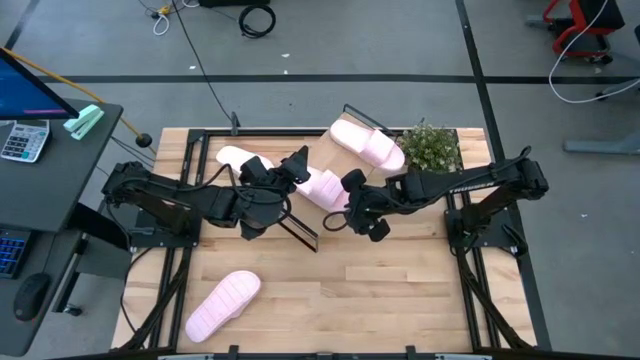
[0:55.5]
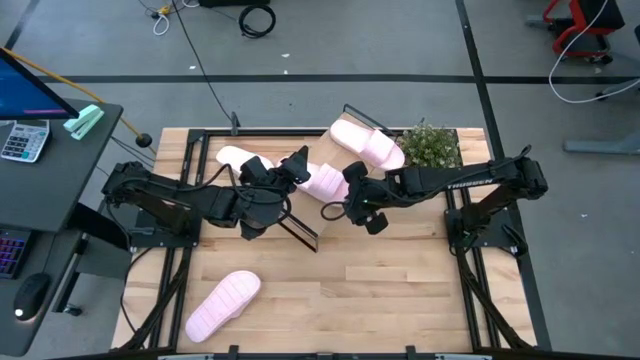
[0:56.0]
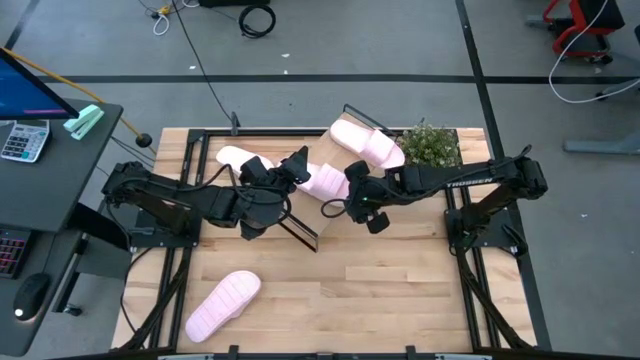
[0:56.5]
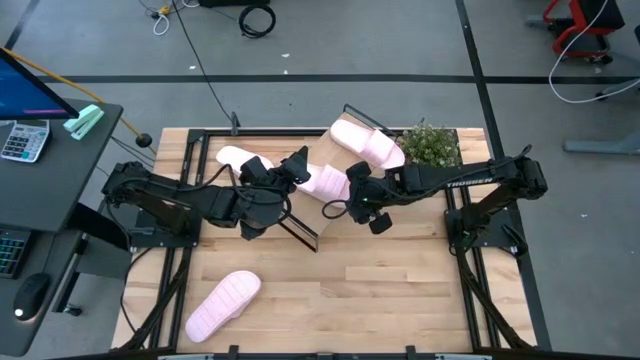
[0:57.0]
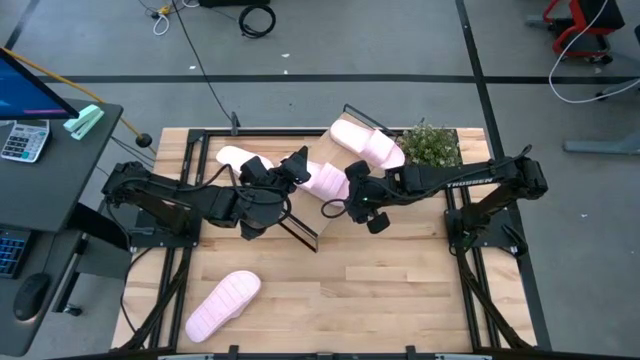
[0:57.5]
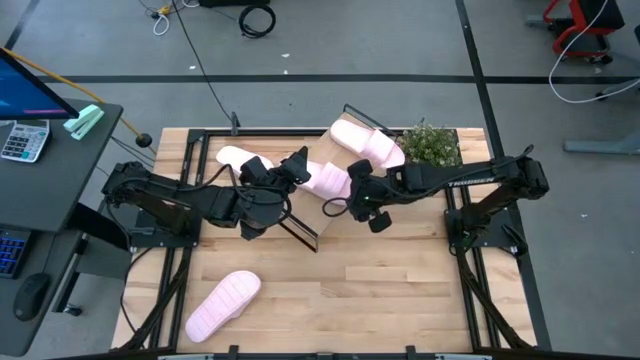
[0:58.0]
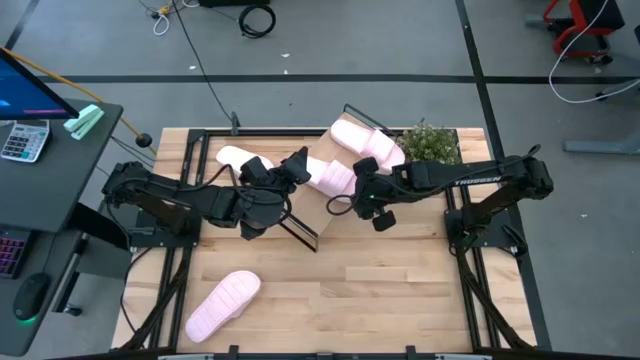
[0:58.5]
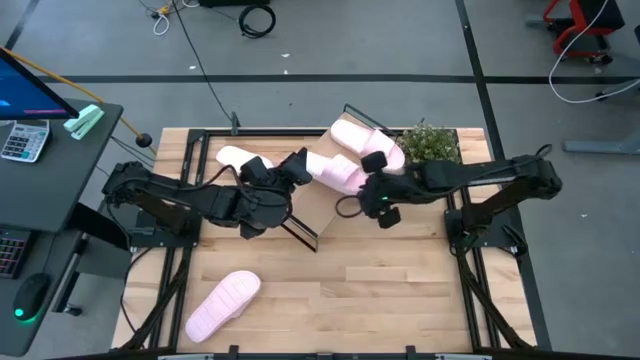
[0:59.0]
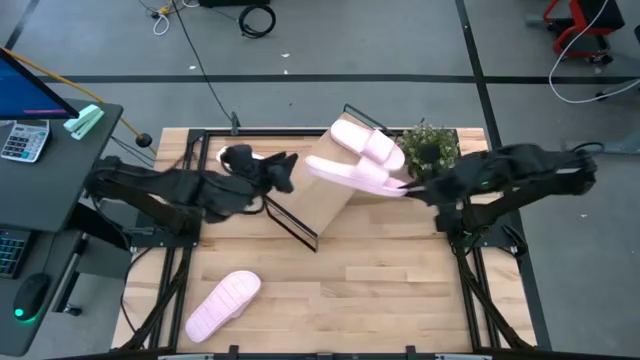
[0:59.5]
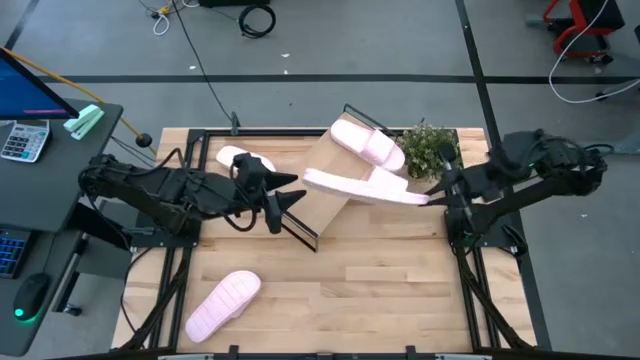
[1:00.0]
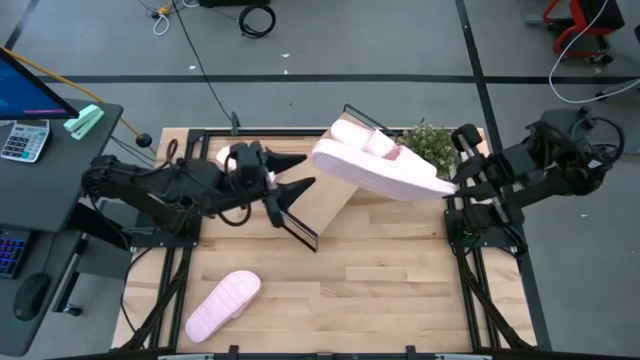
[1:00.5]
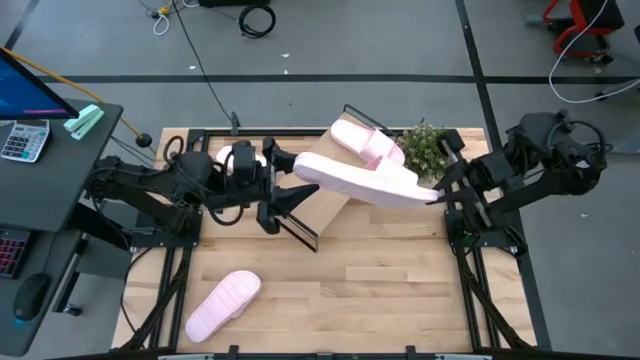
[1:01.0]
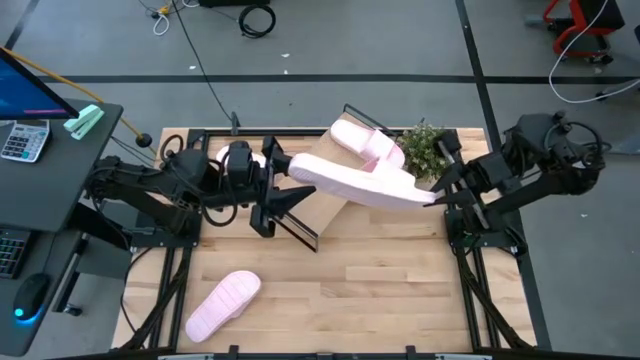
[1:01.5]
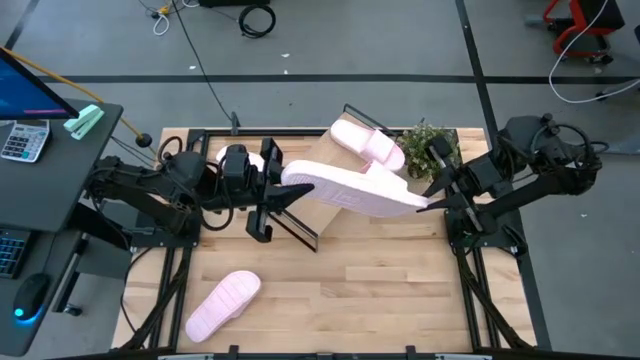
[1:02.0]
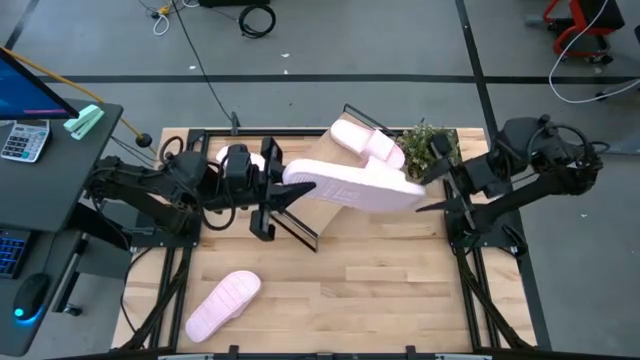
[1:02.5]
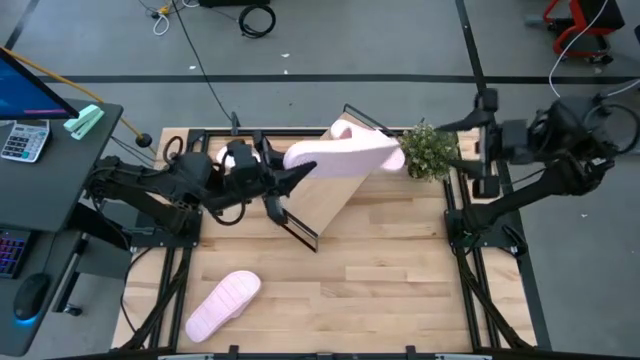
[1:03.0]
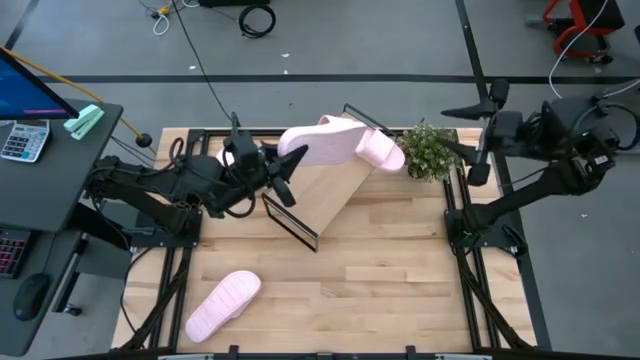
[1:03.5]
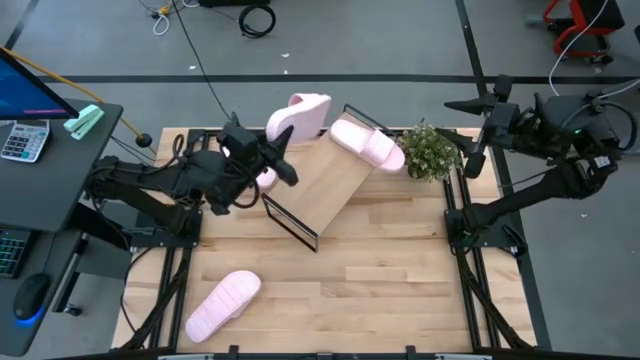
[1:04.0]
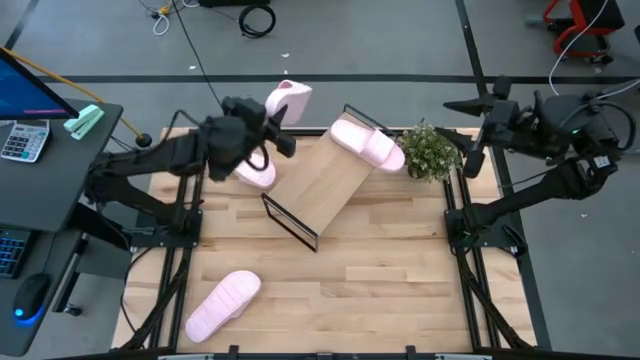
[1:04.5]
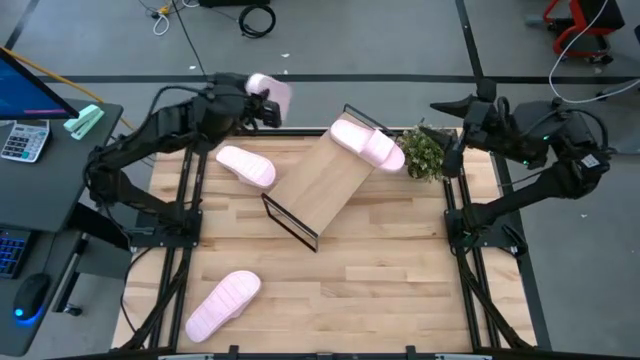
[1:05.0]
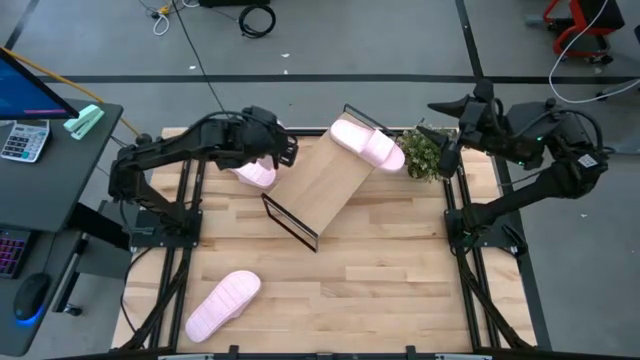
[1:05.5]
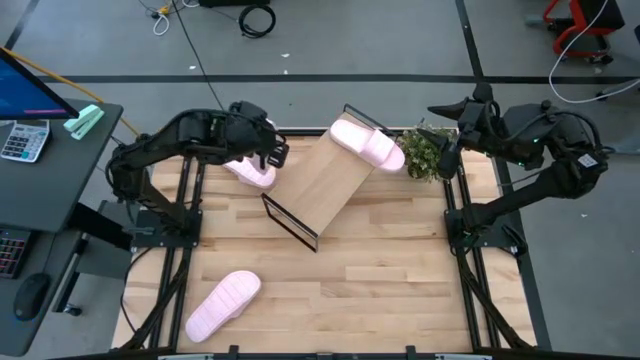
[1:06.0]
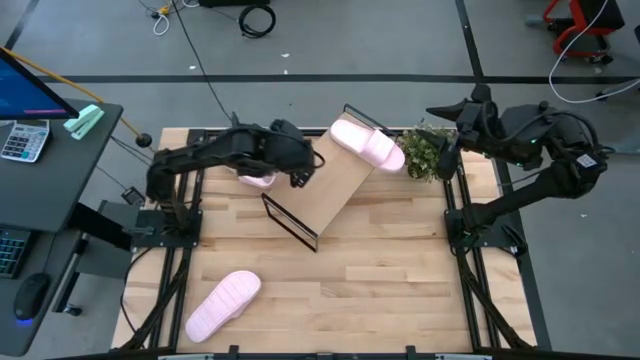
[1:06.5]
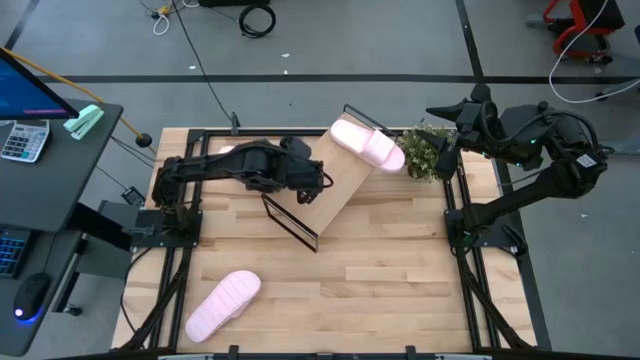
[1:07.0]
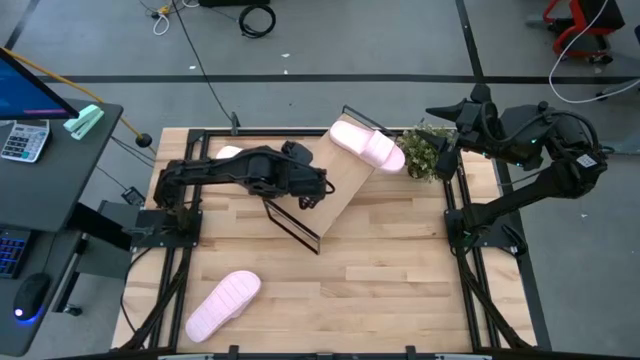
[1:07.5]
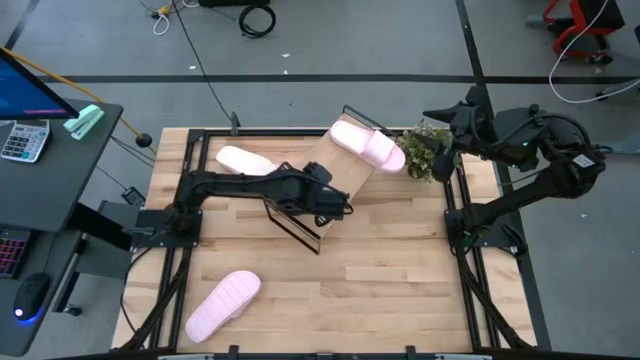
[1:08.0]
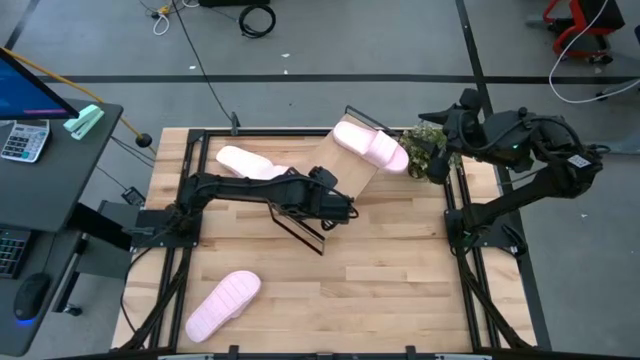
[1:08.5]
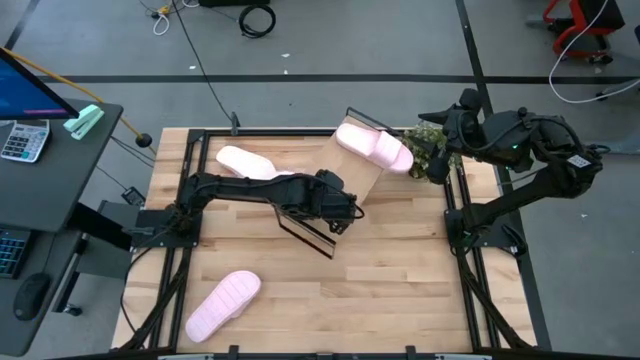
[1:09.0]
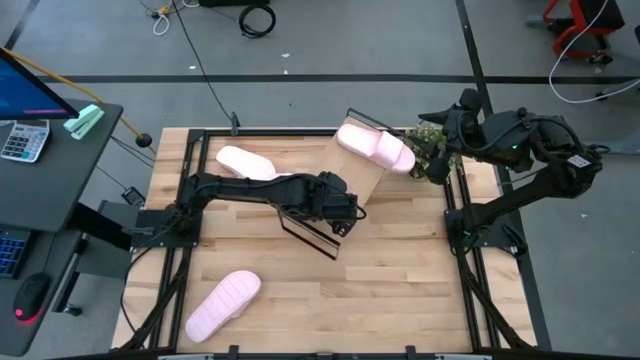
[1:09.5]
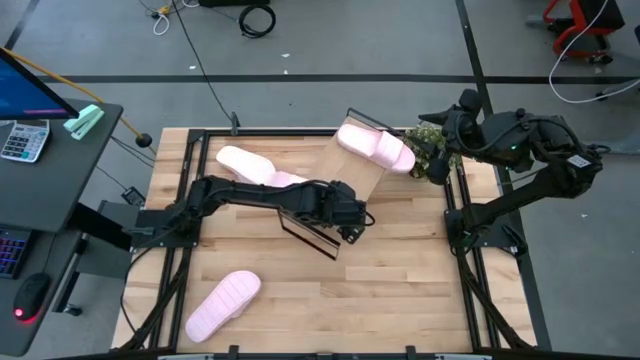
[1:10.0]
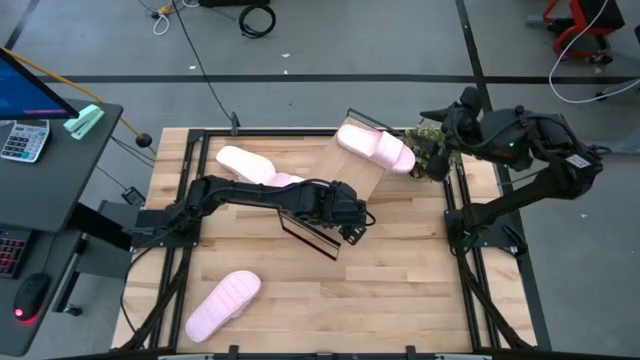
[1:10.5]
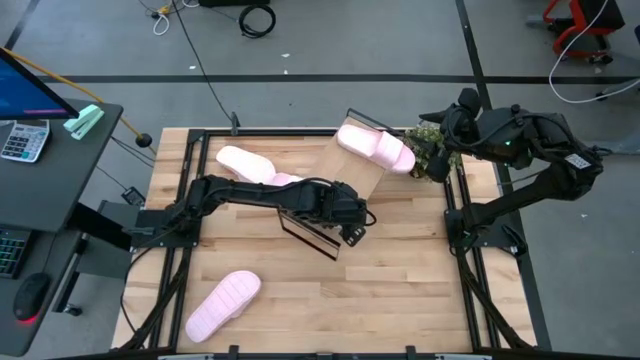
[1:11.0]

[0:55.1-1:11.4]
Task: Pick and place slides into the shelf
Put the top right pink slide on the shelf

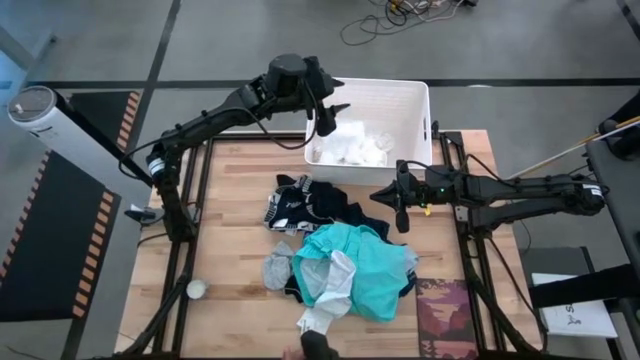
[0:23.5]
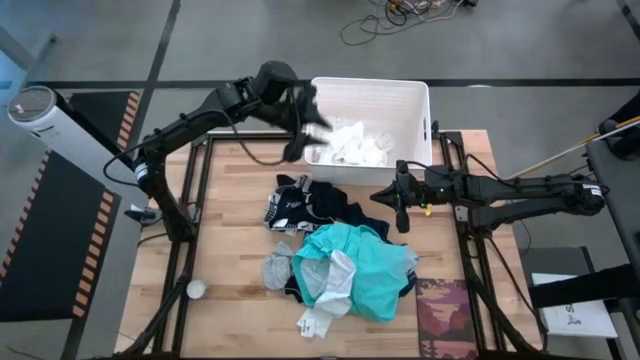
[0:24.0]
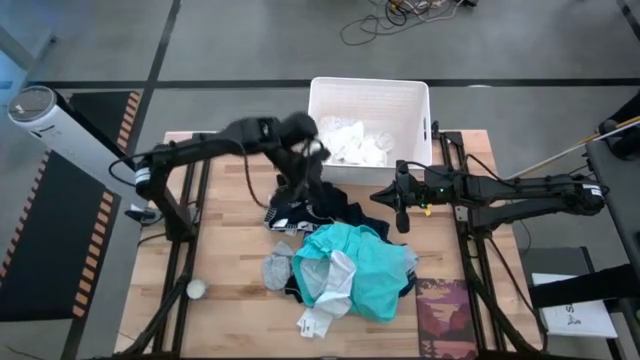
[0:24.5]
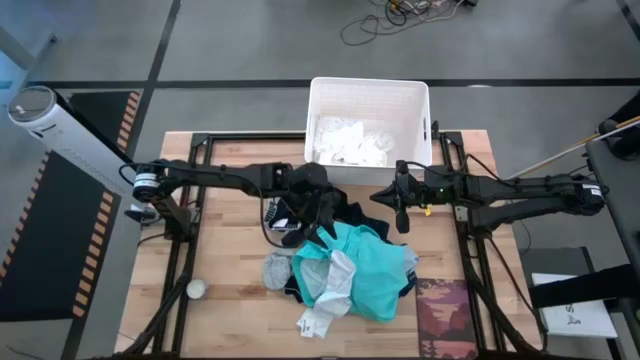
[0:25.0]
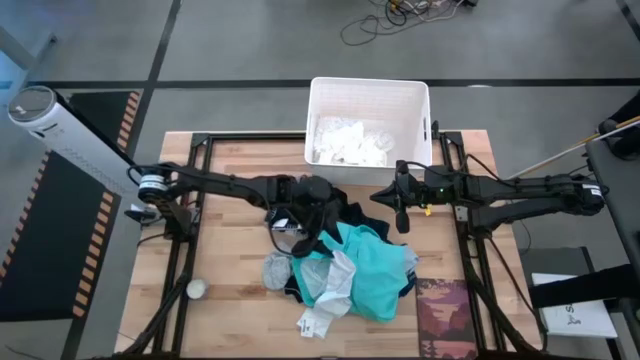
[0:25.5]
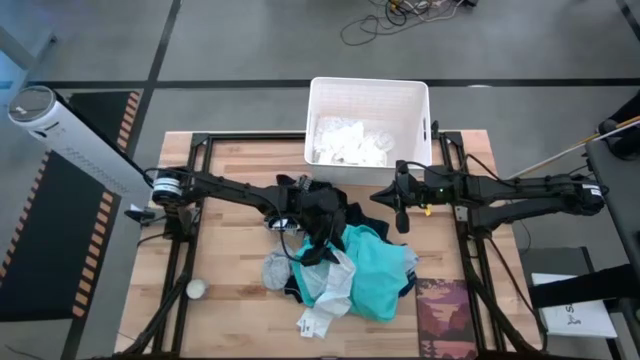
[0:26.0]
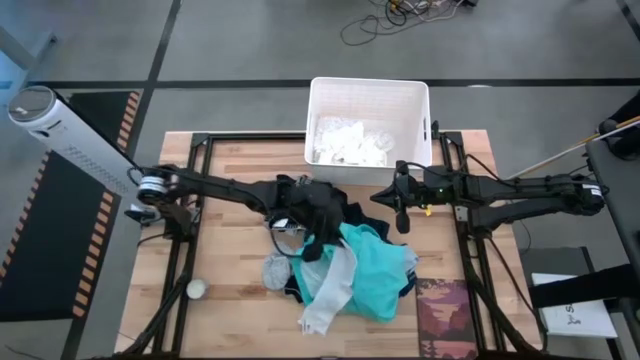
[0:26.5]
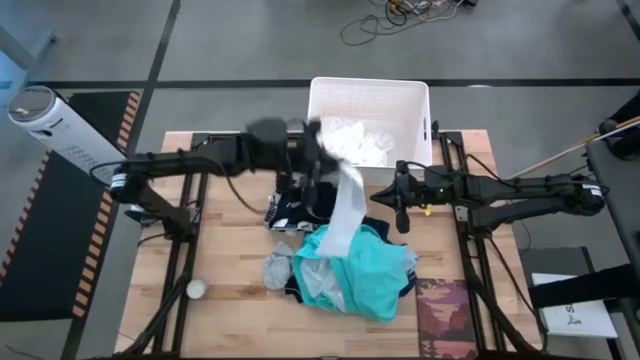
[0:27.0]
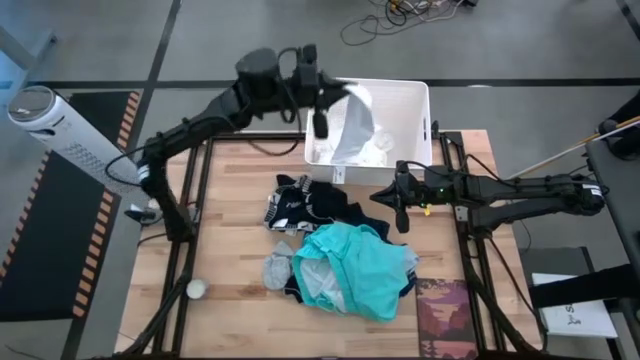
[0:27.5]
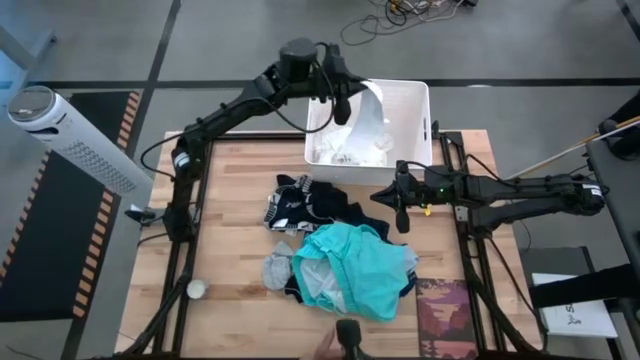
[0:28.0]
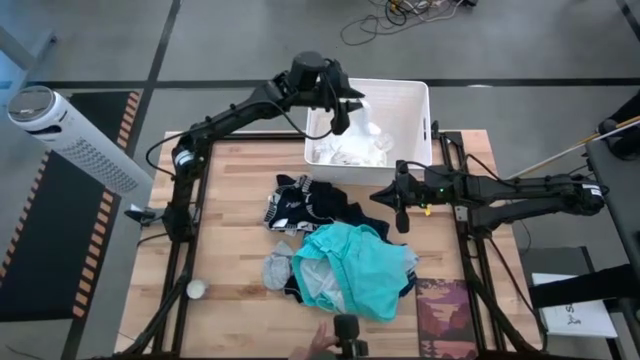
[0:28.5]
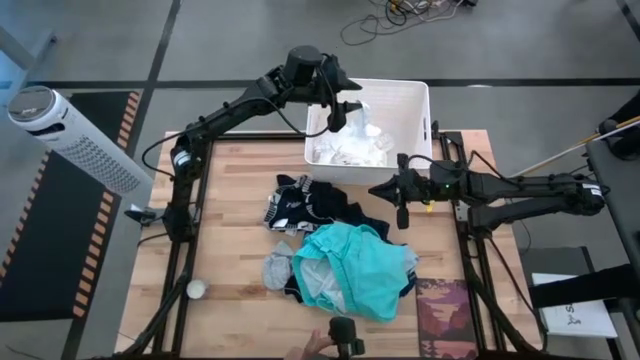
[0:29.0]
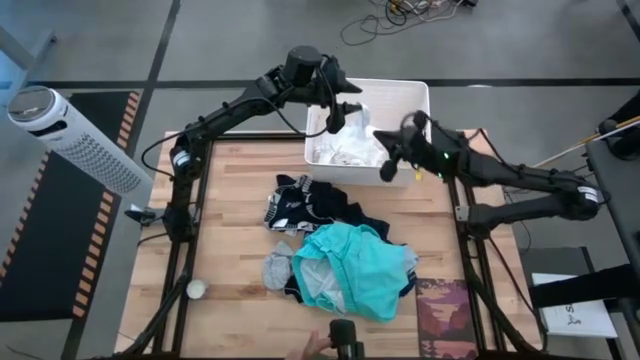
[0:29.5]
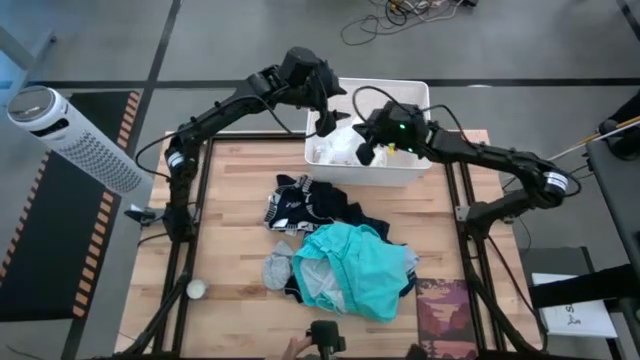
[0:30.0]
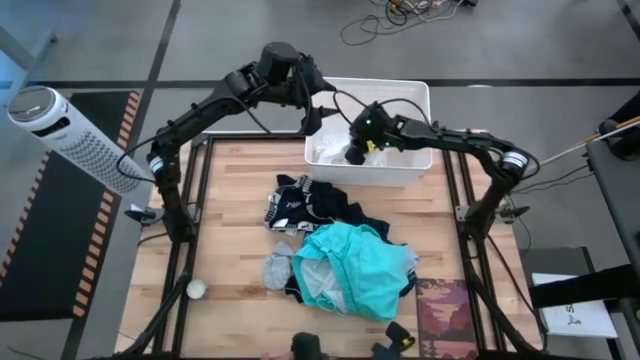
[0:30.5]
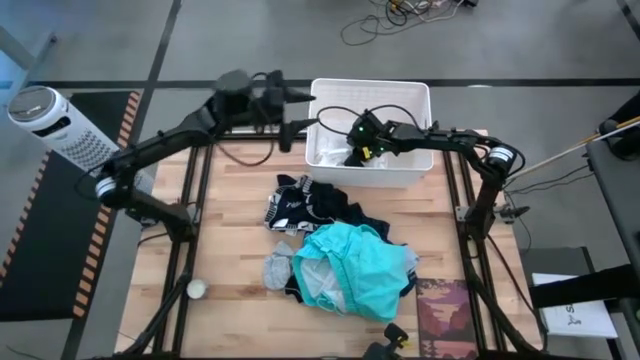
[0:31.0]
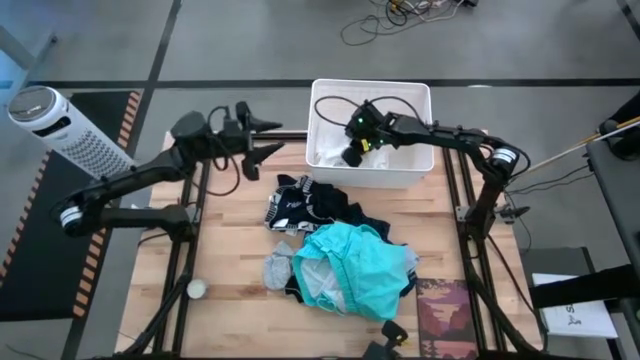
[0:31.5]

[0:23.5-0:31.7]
Task: Sort clothes
Put the white sock into the white laundry bin
